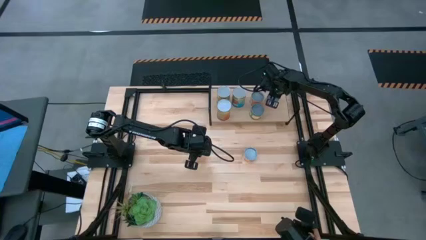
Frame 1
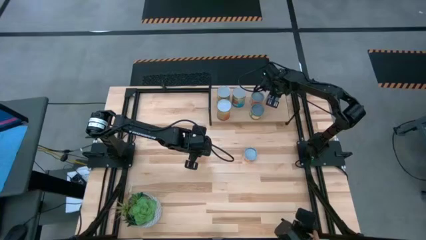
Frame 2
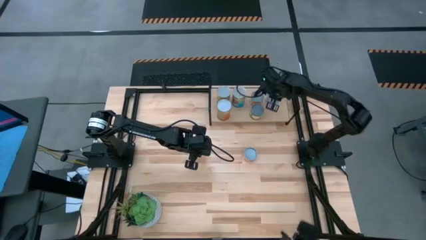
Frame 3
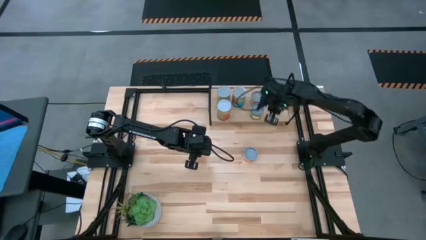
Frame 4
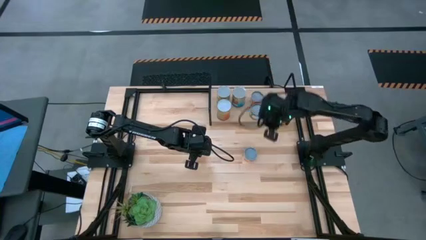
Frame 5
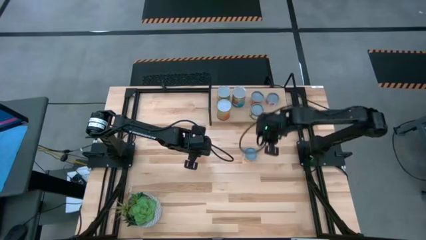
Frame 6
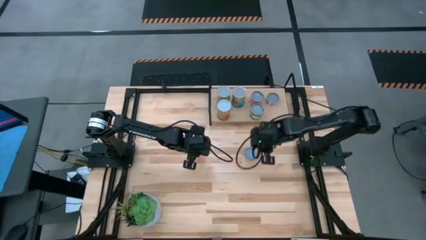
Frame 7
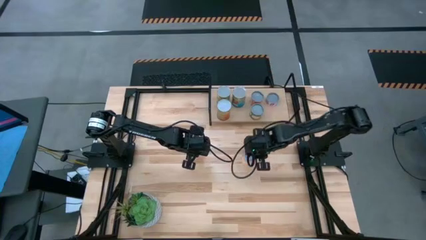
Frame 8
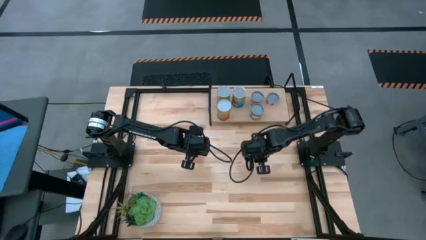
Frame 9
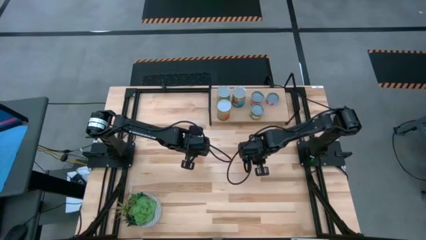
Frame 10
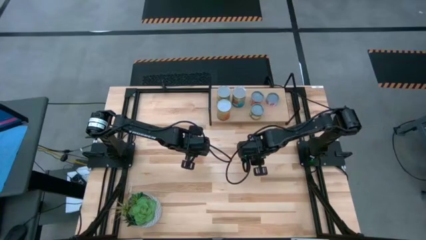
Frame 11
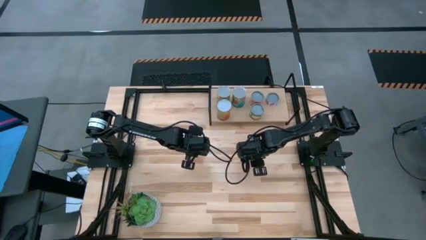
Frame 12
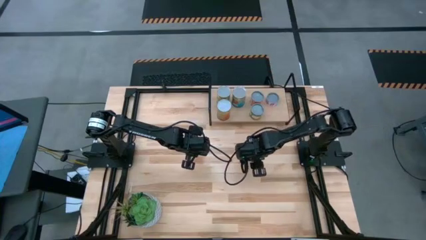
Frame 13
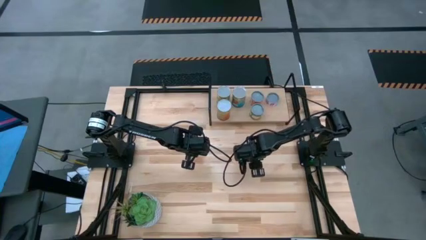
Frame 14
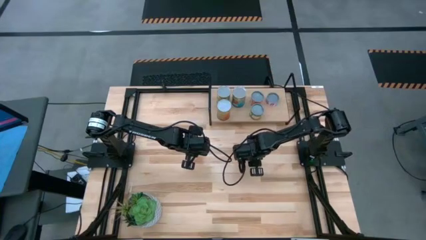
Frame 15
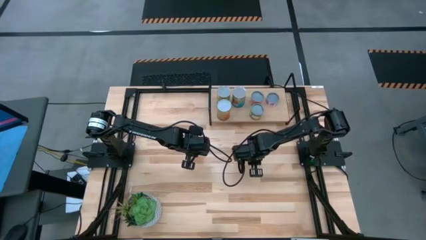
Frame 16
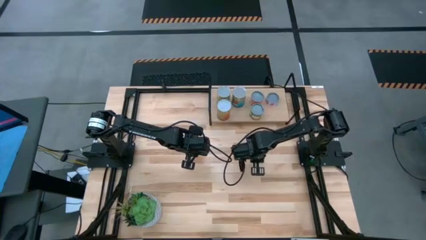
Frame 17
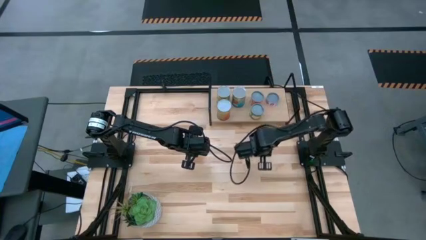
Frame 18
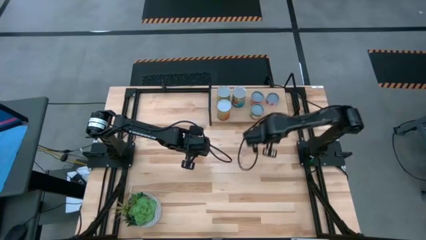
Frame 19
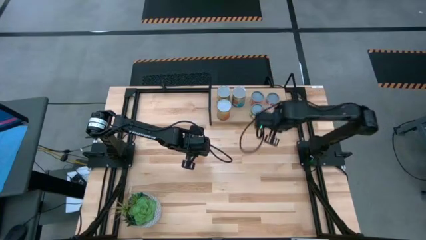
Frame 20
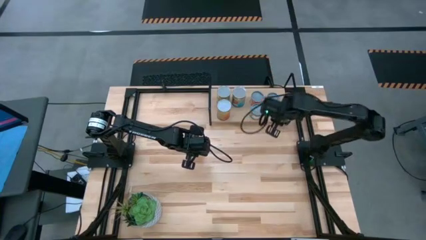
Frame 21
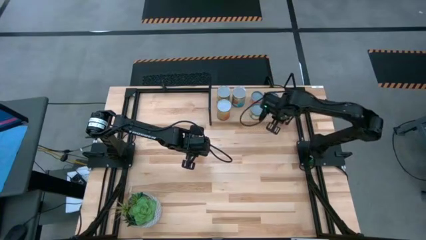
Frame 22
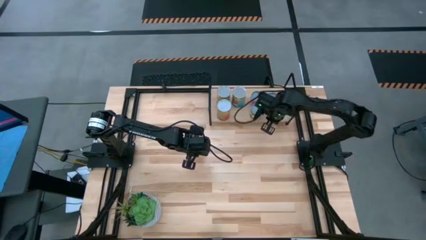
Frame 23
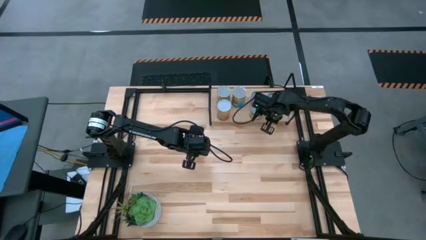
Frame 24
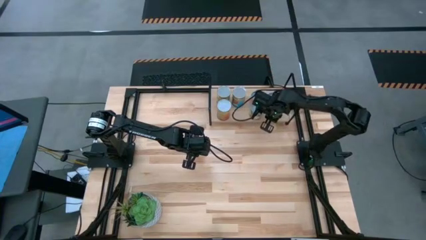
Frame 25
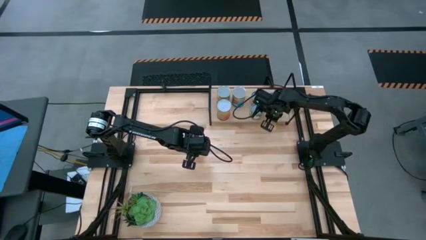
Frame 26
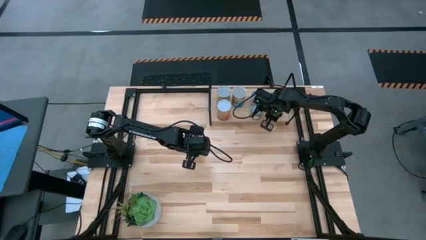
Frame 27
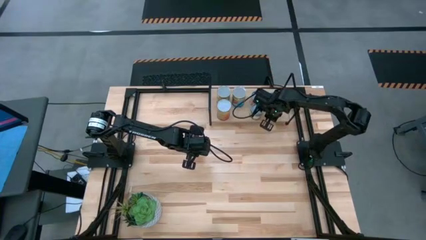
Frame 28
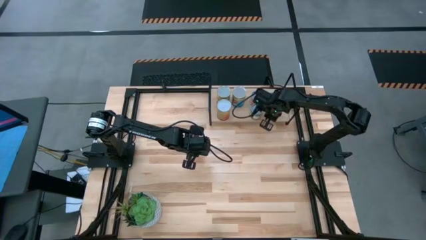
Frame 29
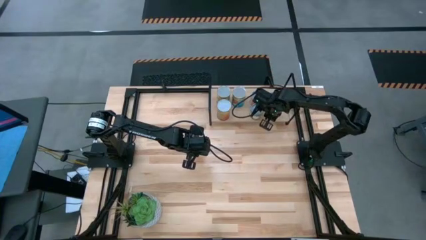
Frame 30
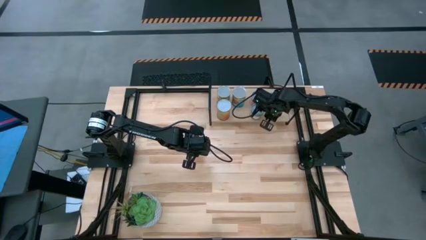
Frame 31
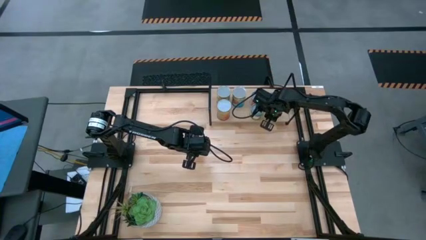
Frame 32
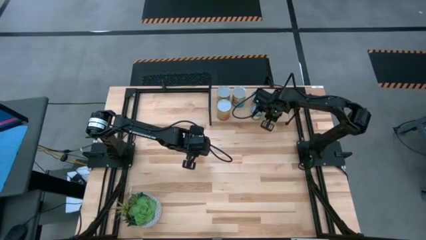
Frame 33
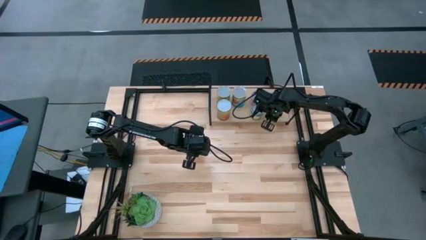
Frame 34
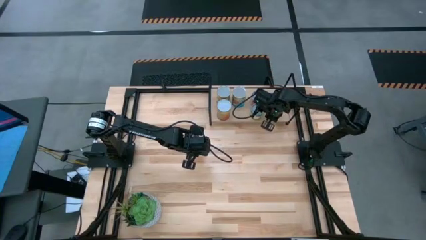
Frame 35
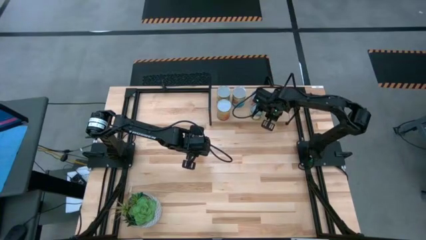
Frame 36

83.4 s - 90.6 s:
Task: Pick and place cans onto a shelf
Put the canned pineapple rings on the shelf

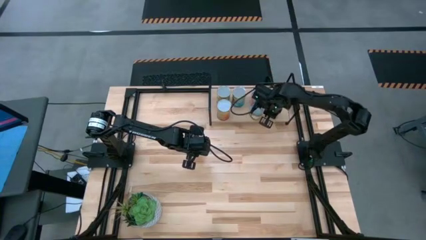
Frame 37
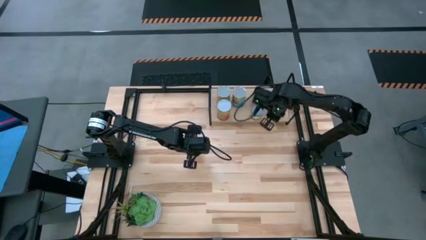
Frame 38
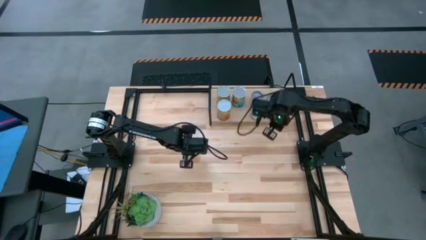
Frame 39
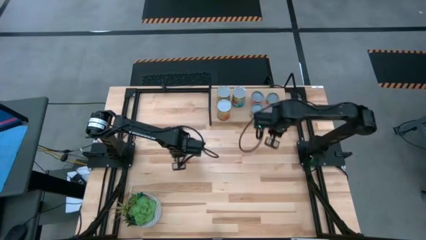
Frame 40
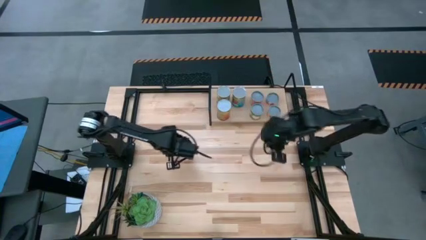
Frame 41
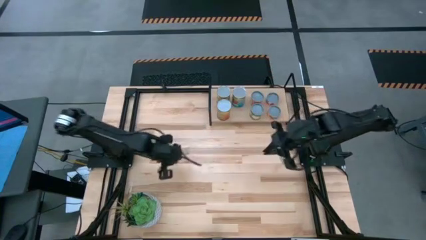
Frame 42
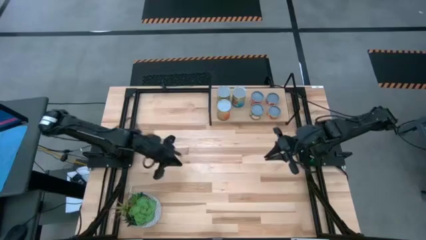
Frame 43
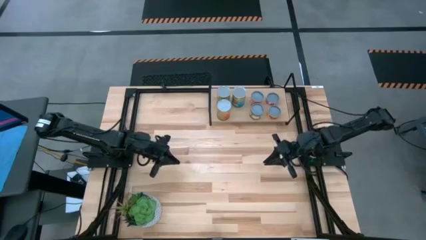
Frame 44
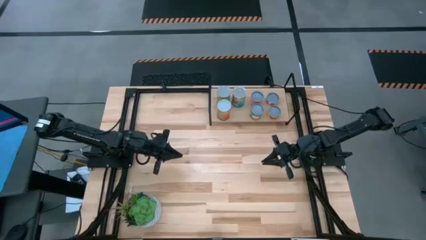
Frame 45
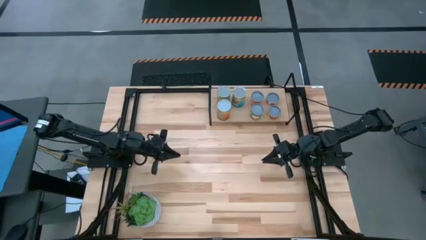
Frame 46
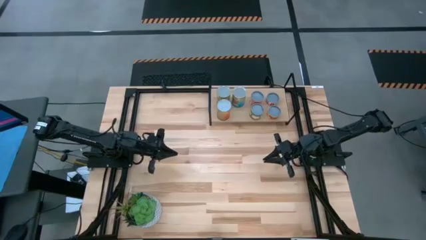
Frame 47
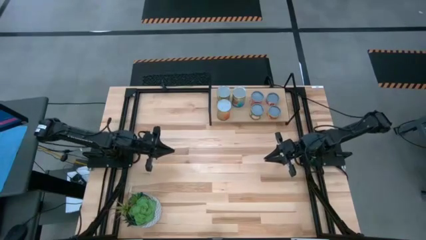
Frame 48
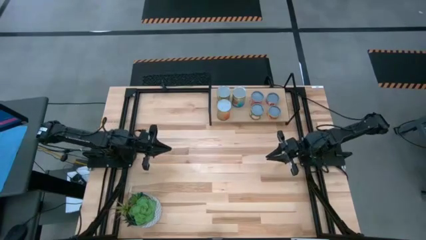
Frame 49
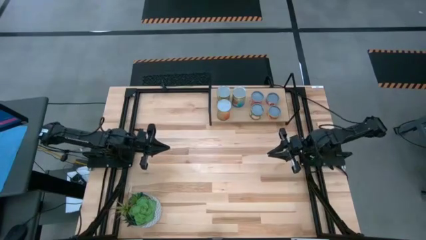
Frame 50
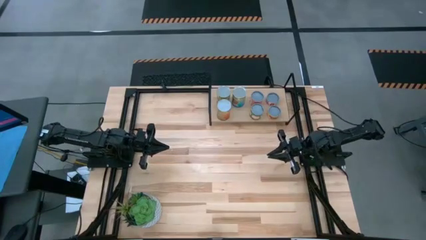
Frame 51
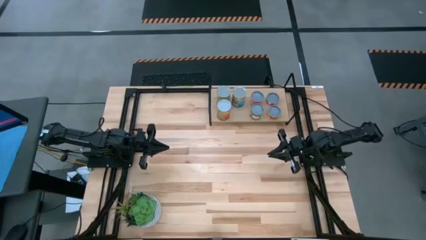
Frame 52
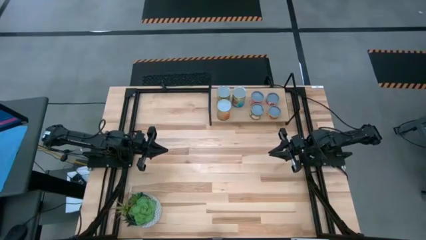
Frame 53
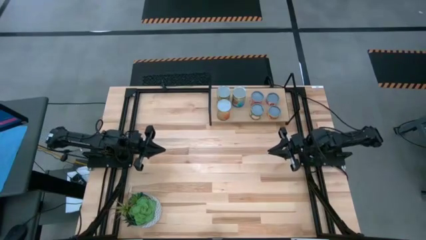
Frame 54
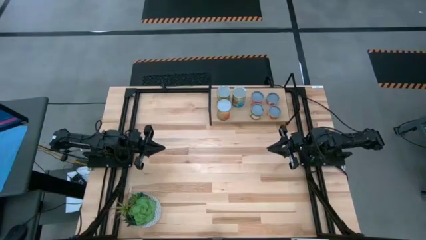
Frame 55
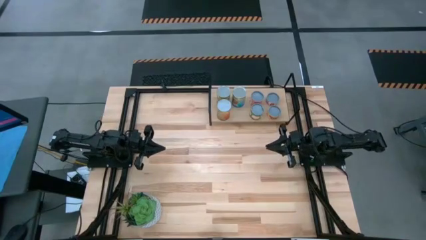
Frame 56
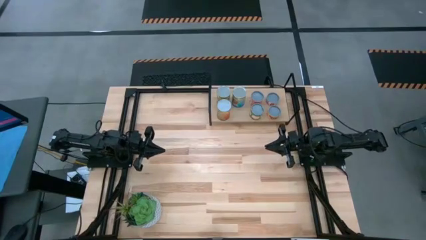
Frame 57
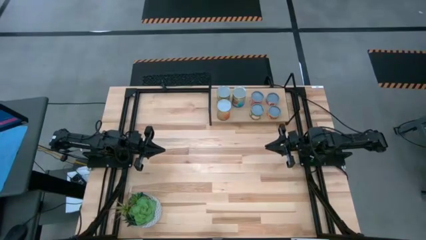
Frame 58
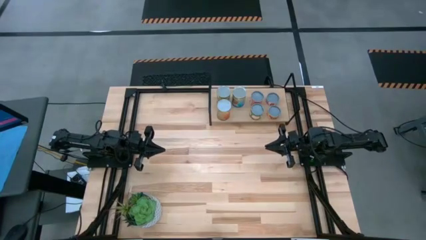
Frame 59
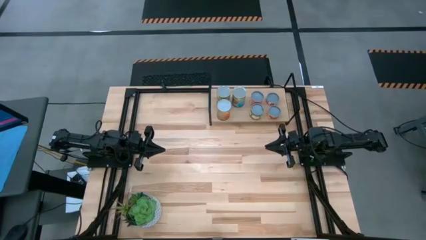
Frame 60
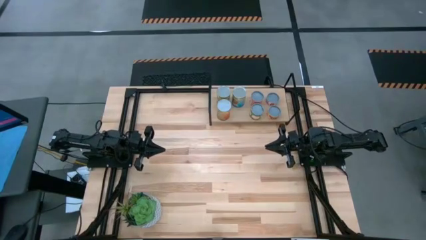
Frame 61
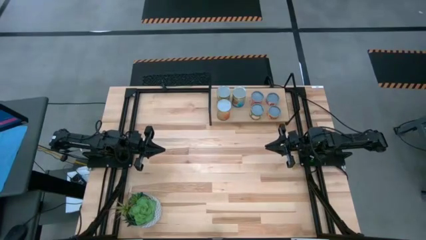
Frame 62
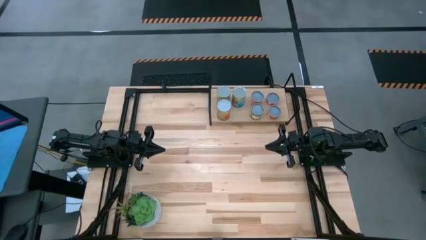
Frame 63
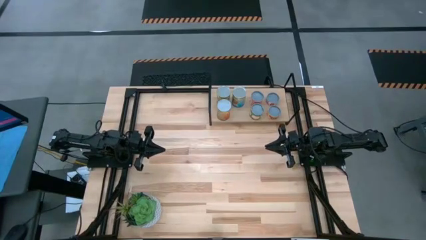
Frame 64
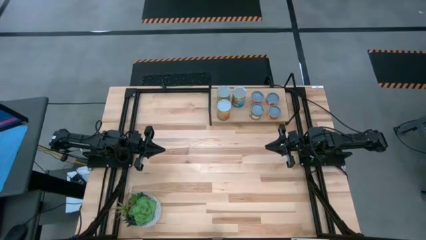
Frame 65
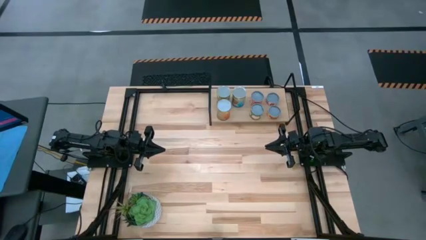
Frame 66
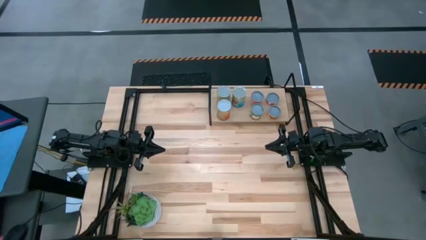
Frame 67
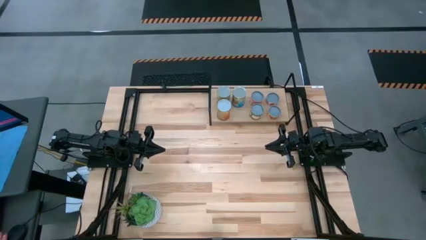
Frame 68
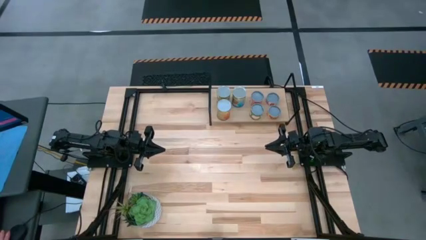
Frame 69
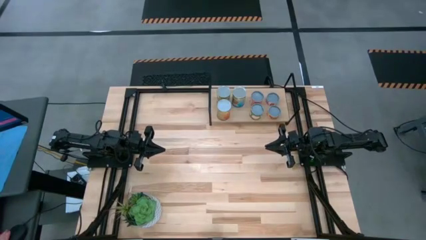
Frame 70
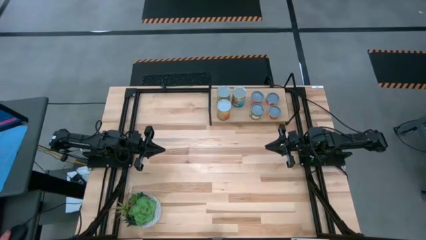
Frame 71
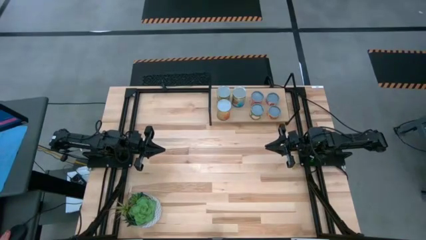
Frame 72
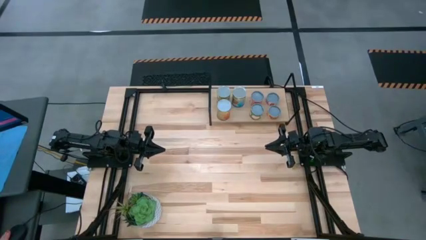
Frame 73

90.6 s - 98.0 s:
Return to Home Position
